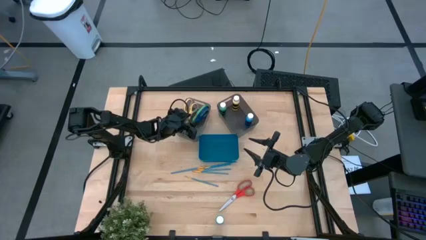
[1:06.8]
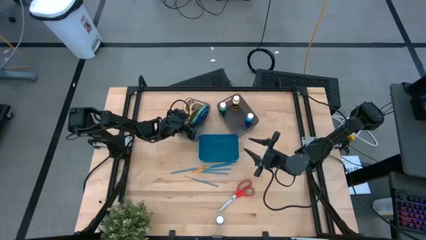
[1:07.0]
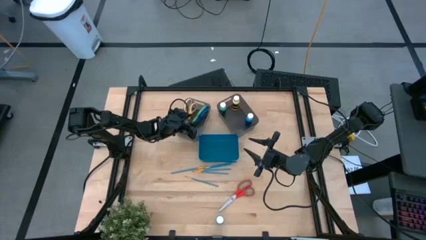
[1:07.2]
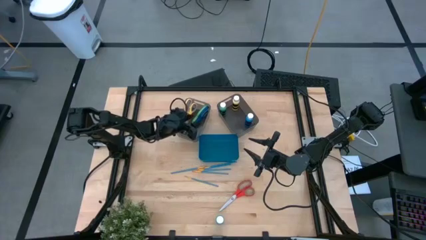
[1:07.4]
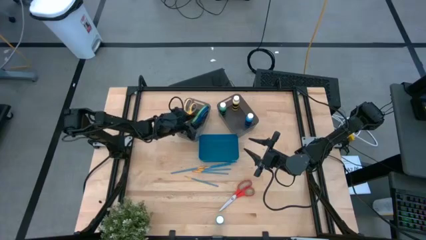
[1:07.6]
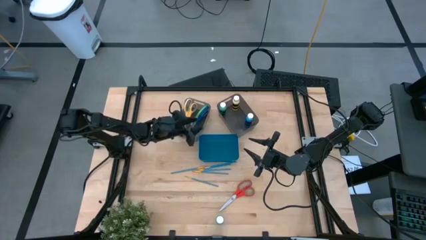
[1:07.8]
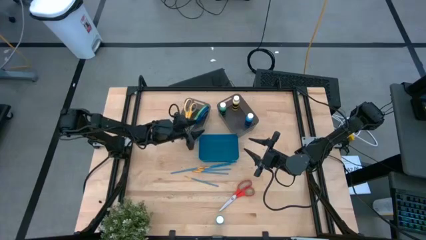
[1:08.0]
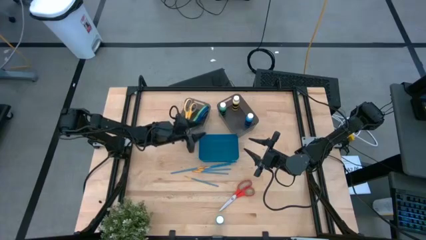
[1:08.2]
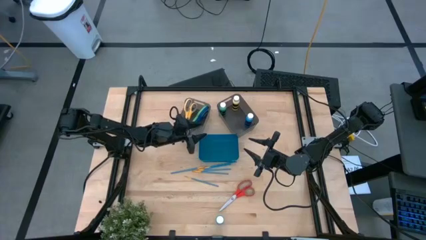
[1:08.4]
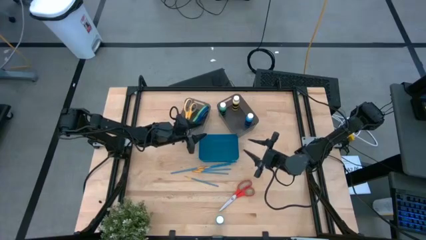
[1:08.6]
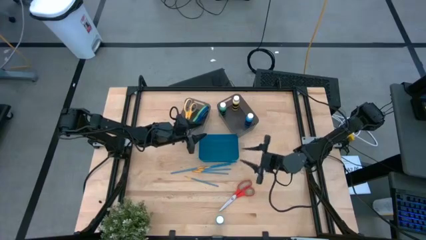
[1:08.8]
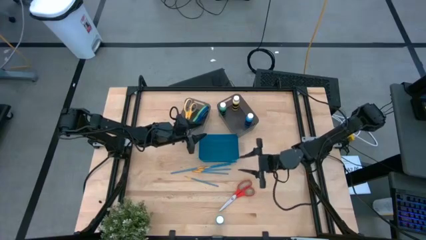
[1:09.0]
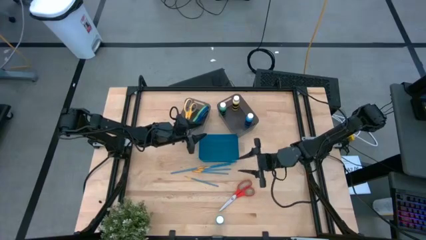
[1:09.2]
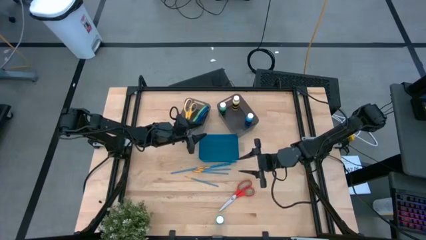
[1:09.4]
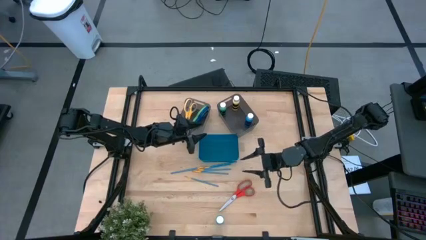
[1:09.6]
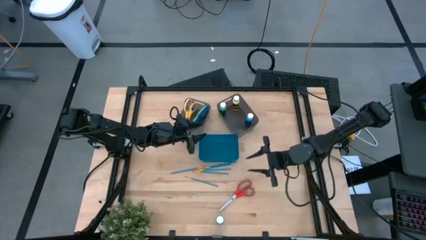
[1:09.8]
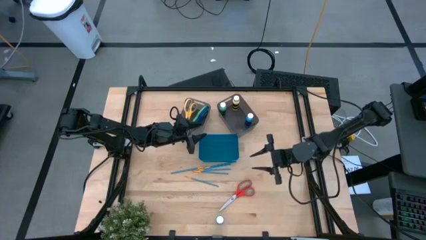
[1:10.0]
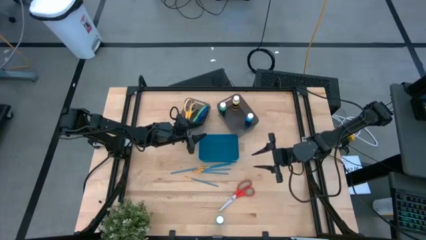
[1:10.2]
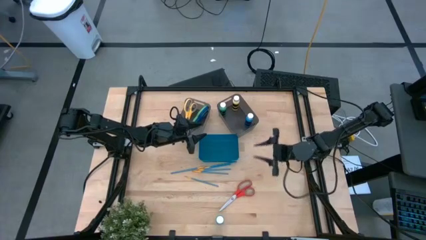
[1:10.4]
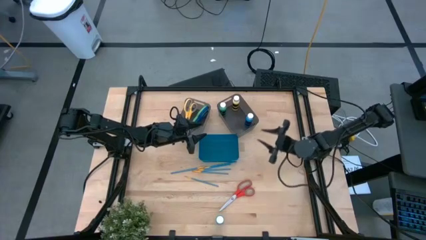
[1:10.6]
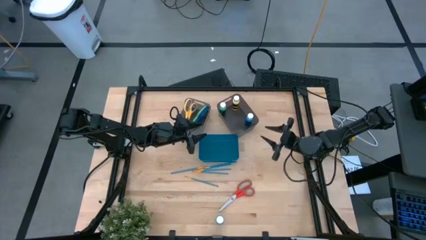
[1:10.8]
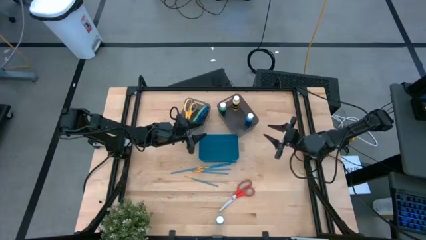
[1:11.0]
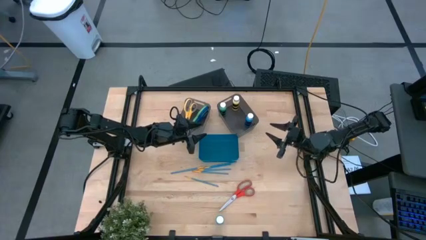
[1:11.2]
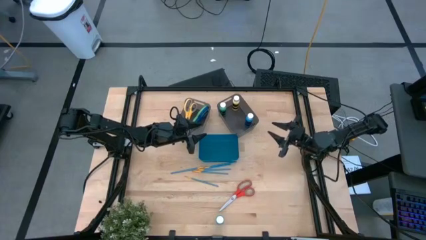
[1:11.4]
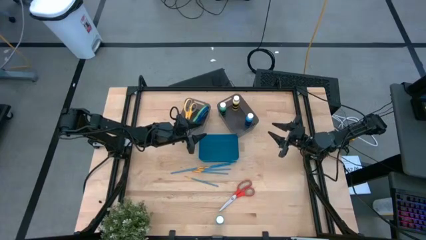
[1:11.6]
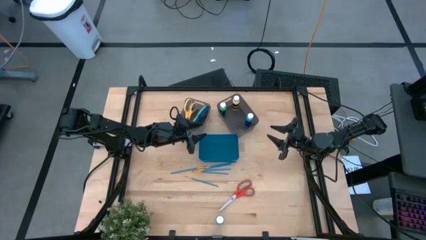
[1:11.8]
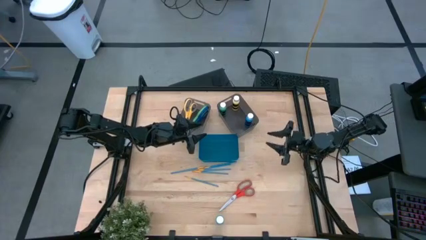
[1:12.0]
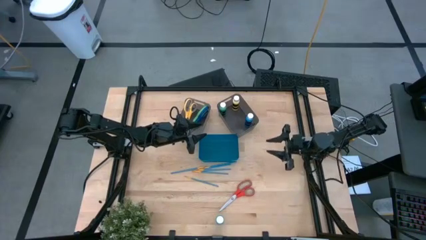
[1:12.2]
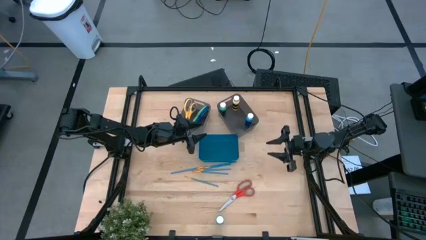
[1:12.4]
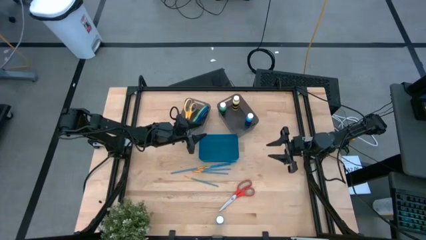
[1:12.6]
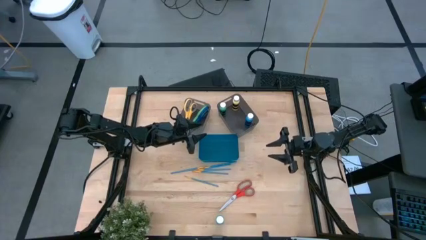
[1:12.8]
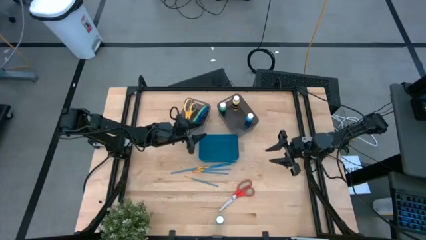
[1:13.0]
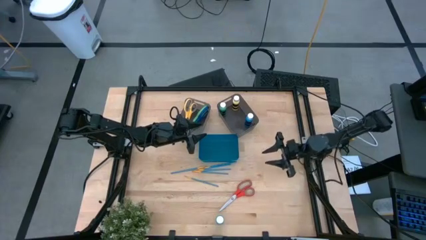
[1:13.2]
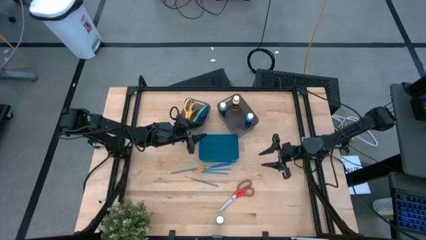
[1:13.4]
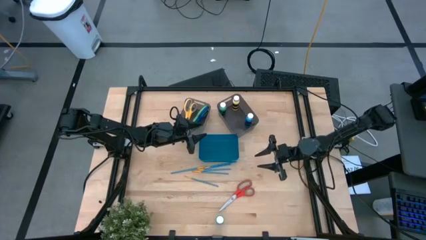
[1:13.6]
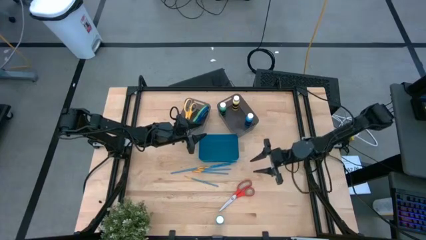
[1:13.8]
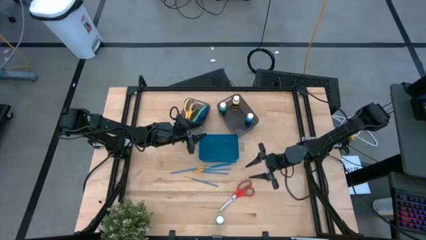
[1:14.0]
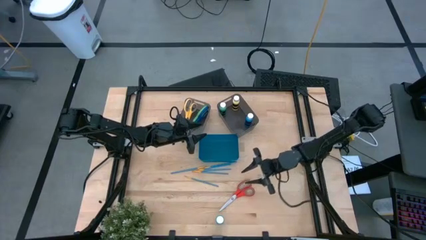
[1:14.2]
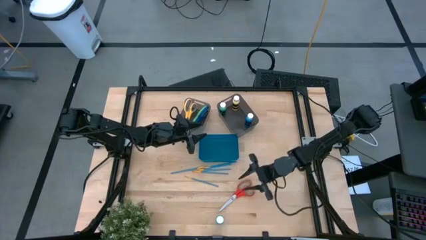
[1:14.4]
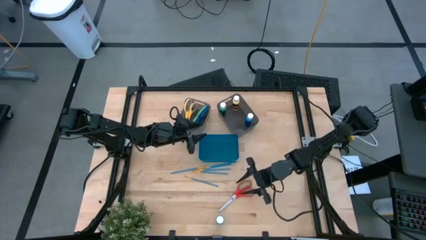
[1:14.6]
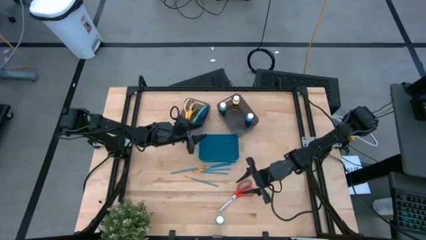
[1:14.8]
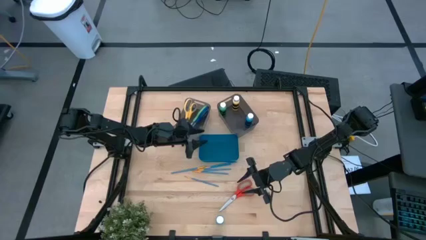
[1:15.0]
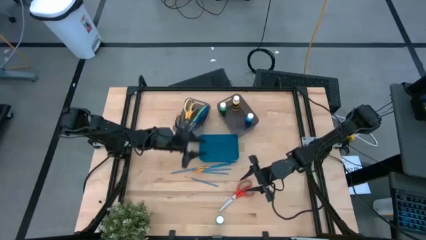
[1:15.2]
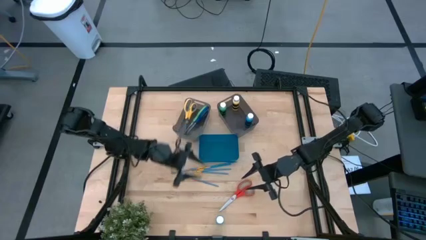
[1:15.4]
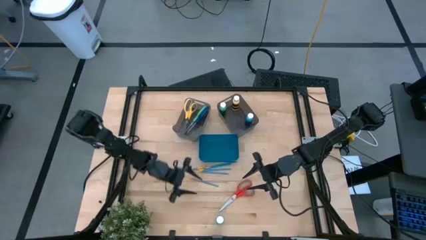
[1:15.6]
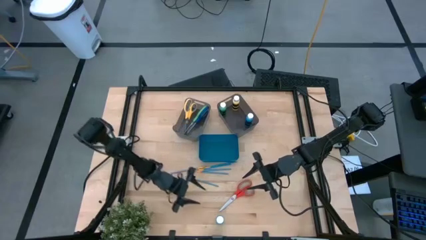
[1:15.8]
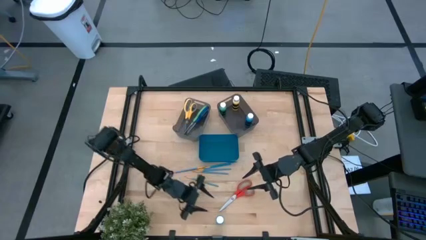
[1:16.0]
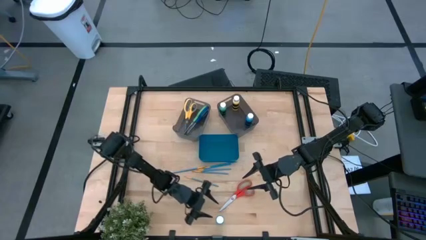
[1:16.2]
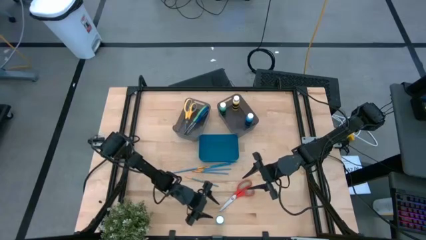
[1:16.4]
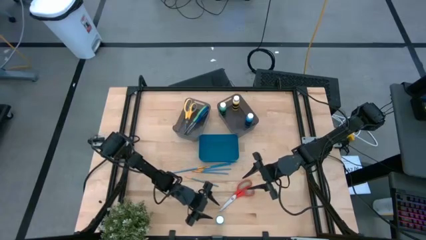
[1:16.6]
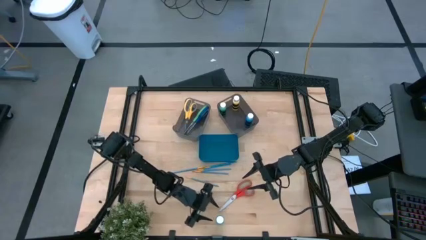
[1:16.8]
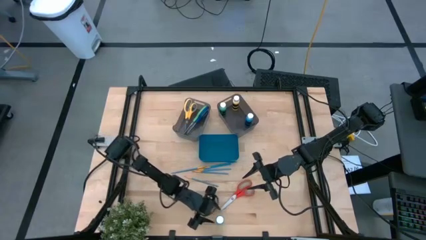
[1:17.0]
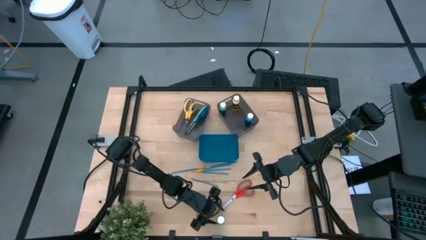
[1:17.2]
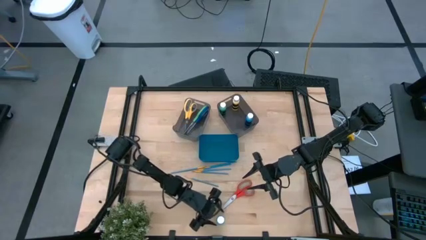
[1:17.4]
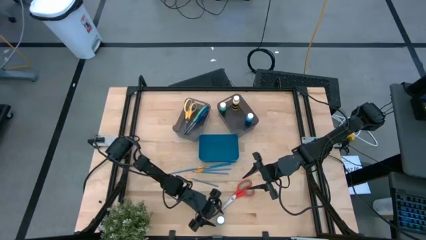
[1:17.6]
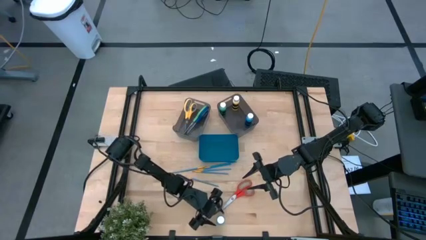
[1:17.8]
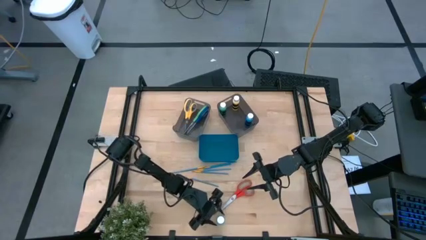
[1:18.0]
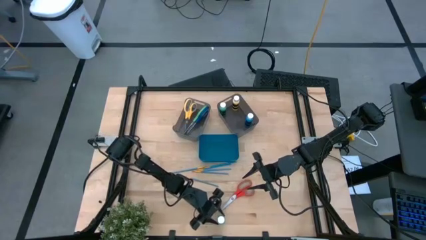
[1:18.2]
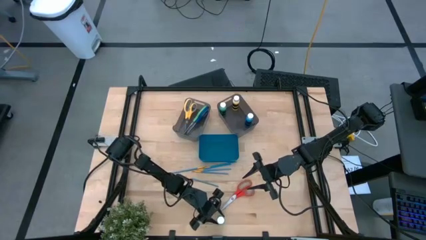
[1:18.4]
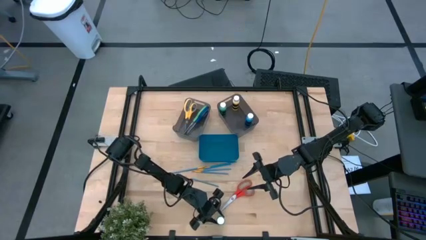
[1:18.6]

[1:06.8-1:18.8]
Task: Pick & Place Paint Supplies
Put the light blue paint bottle into the right black bin

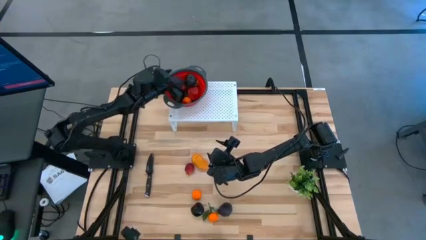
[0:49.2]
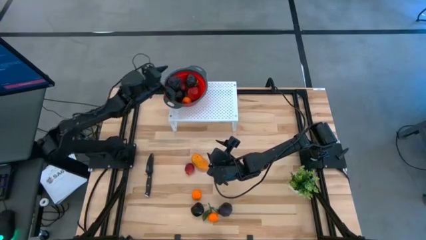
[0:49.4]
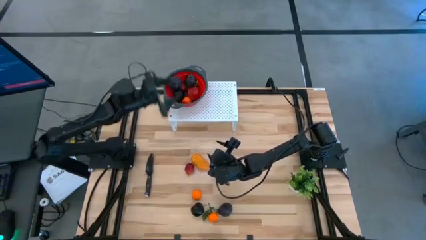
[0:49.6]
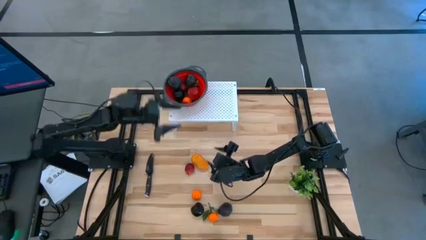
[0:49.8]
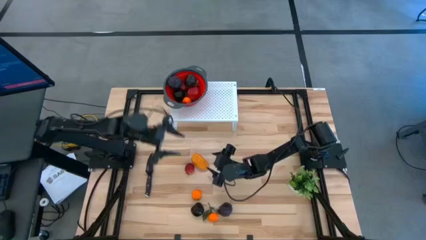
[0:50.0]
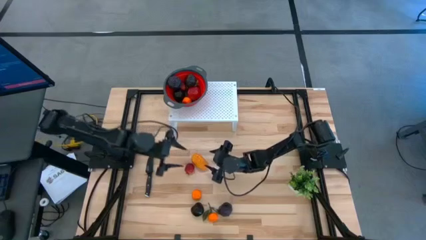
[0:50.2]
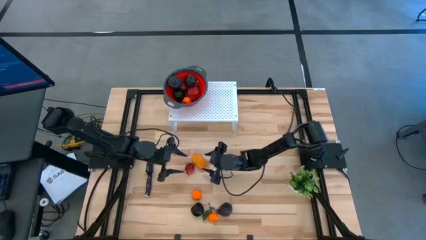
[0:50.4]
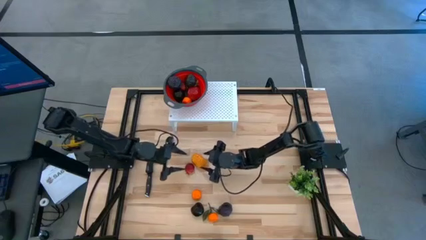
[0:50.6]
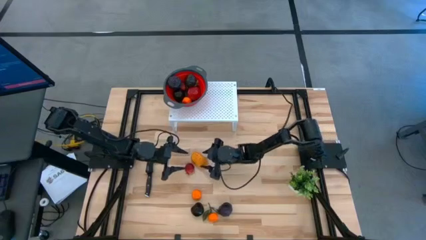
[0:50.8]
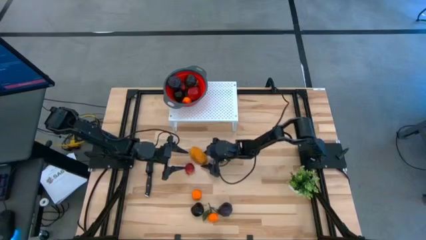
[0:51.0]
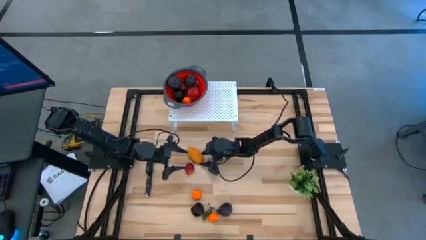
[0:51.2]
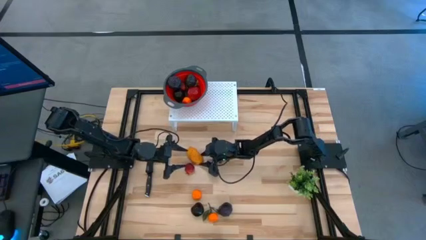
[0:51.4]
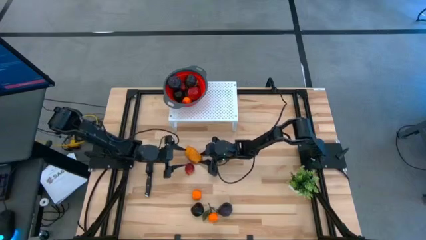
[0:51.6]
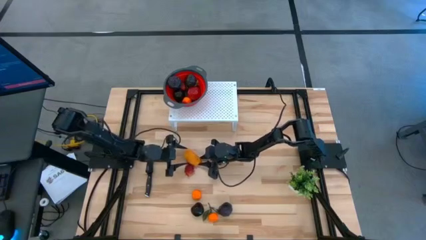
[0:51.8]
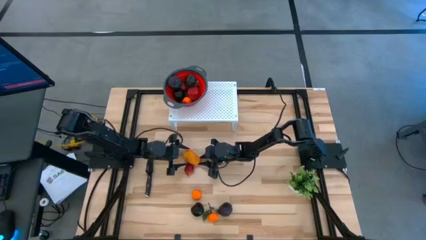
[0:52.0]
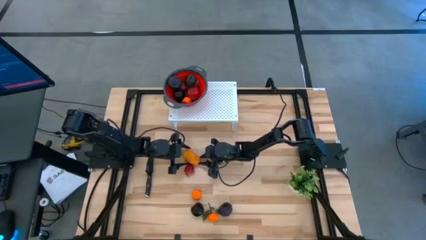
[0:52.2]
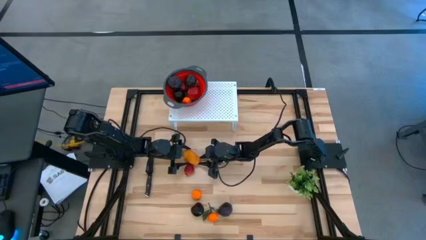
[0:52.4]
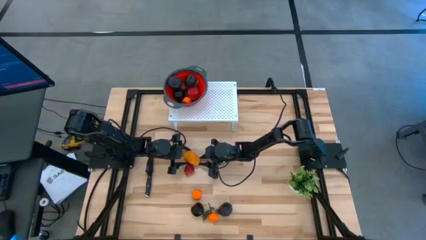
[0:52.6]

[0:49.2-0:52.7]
Task: Pick & Place Fruit
Put the yellow mango into the red strainer bowl on the shelf

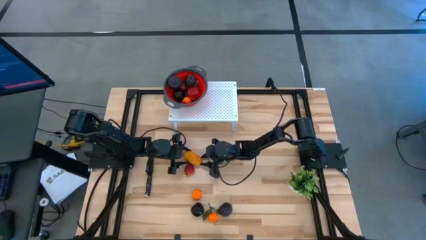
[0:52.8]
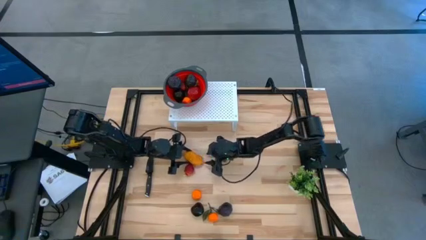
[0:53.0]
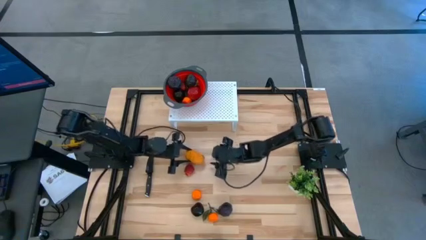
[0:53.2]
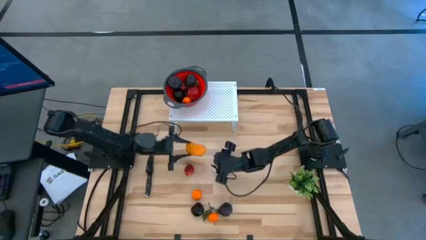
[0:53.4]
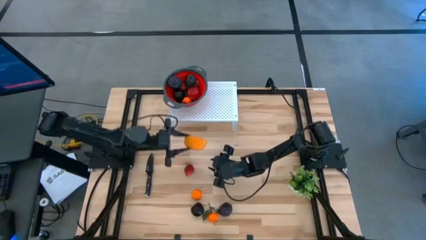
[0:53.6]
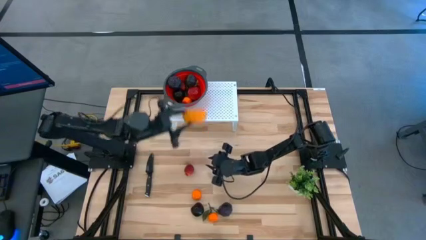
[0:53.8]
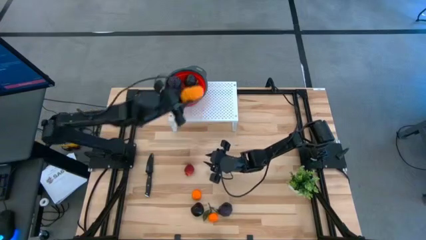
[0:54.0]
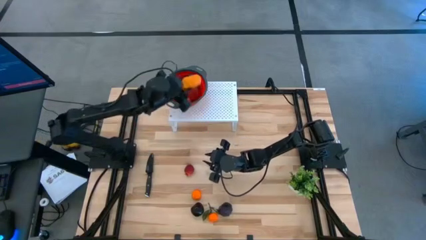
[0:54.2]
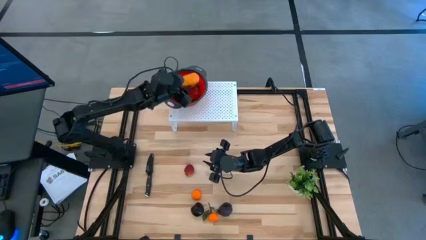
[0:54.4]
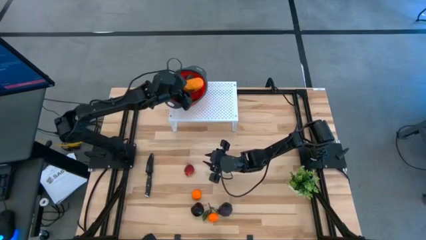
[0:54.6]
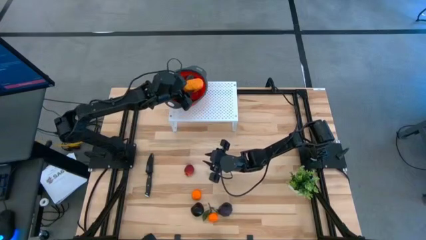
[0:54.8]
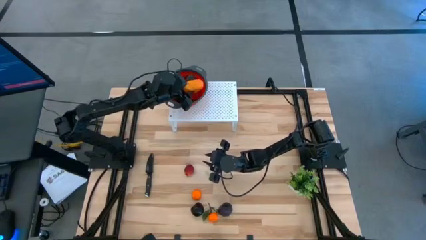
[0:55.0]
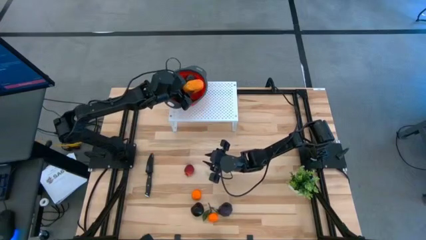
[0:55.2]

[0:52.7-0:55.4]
Put the yellow mango into the red strainer bowl on the shelf
